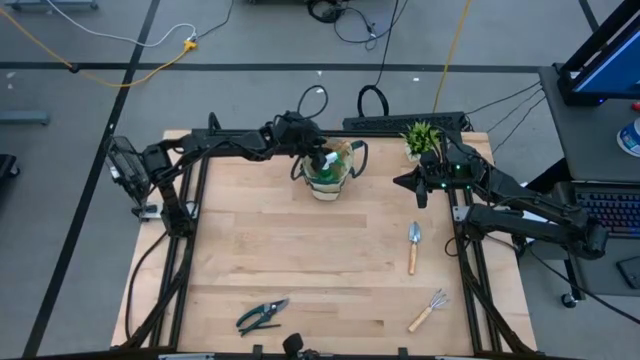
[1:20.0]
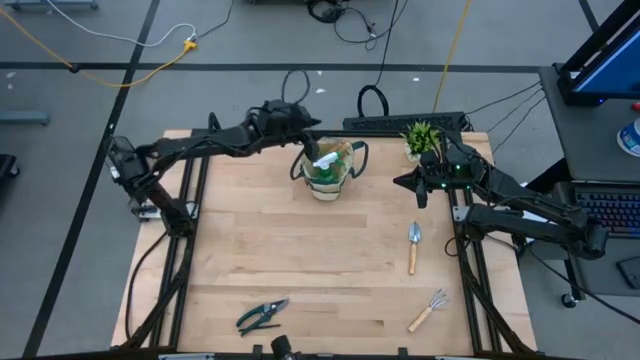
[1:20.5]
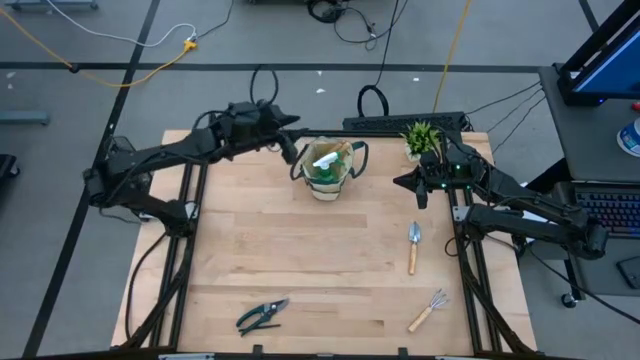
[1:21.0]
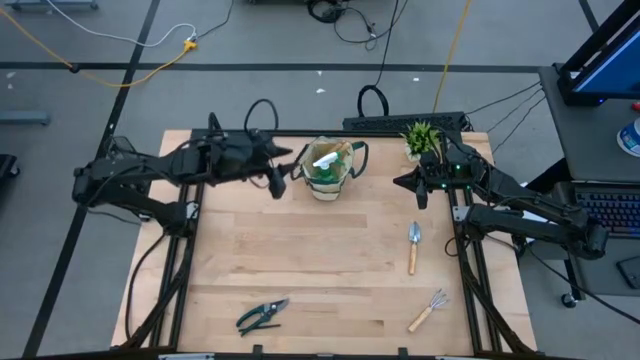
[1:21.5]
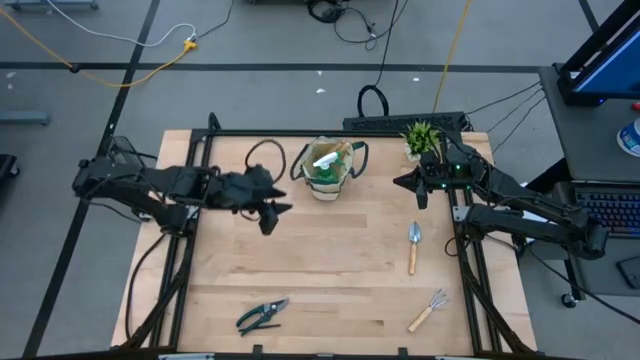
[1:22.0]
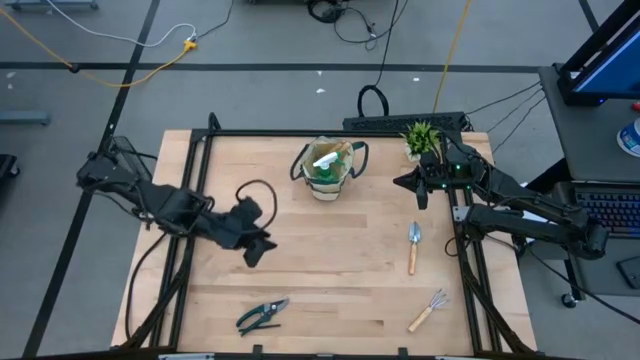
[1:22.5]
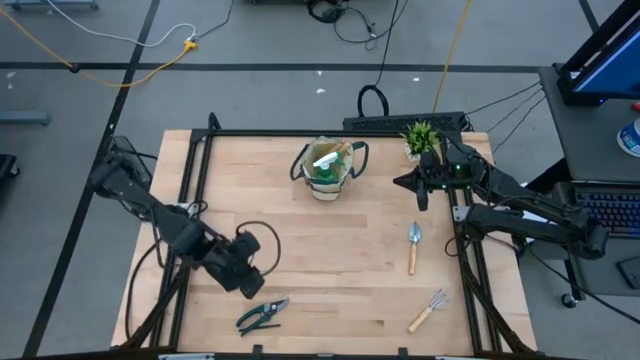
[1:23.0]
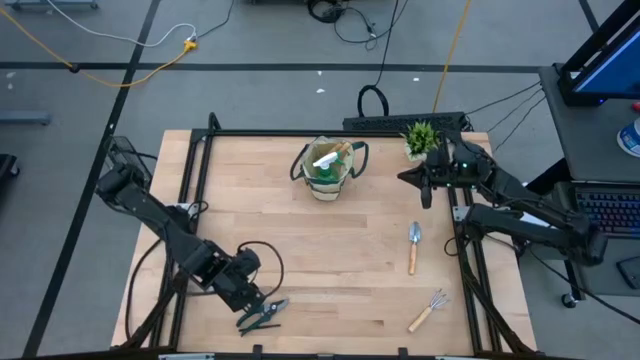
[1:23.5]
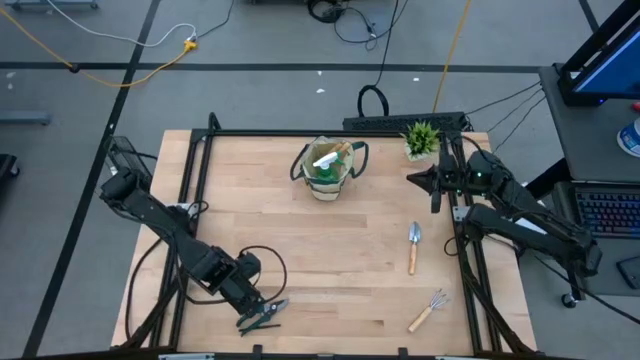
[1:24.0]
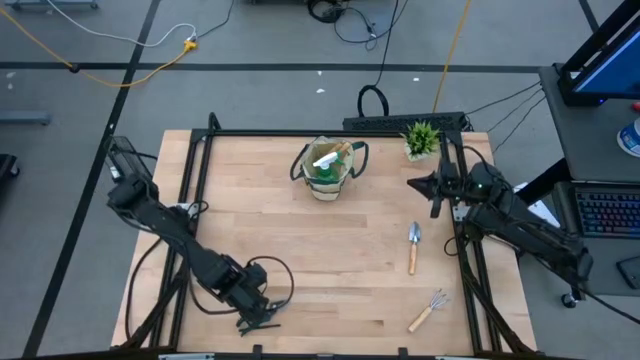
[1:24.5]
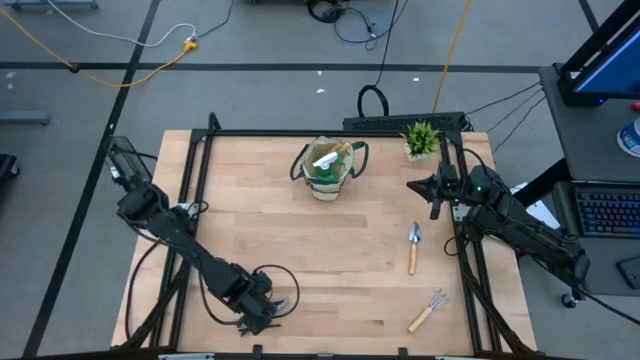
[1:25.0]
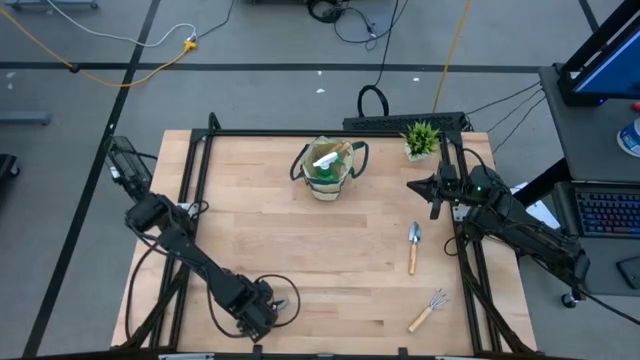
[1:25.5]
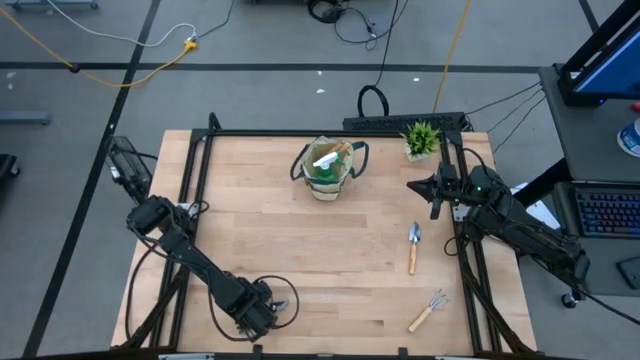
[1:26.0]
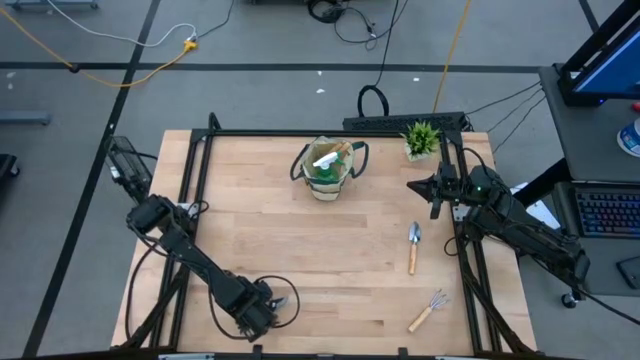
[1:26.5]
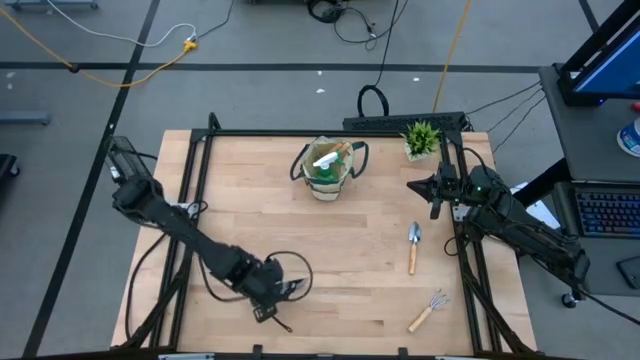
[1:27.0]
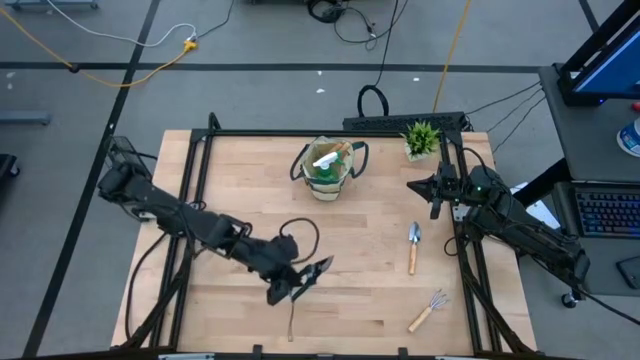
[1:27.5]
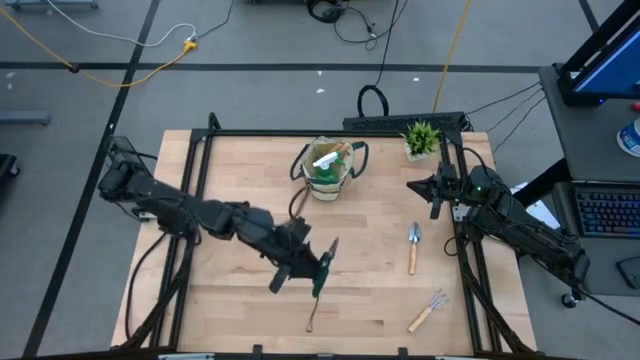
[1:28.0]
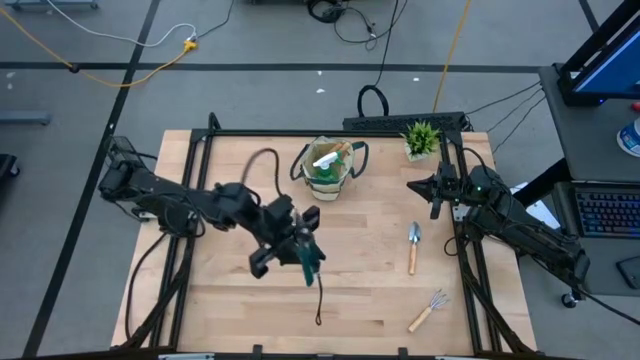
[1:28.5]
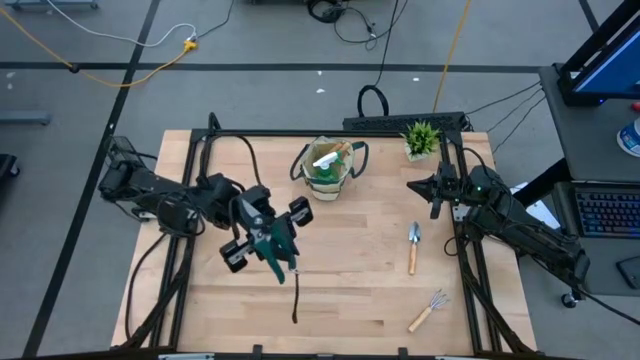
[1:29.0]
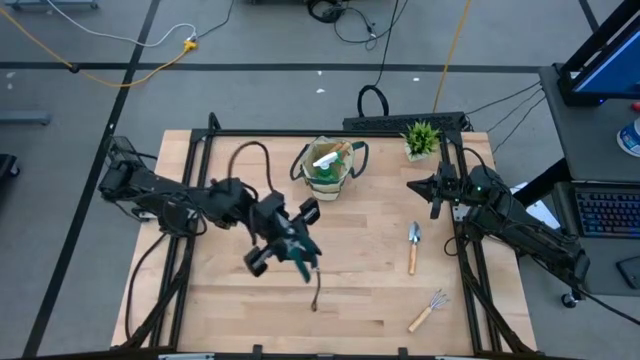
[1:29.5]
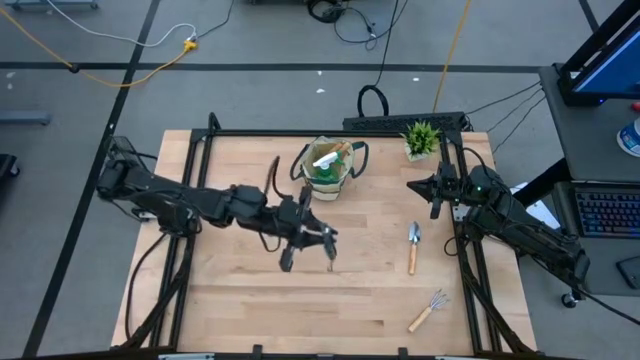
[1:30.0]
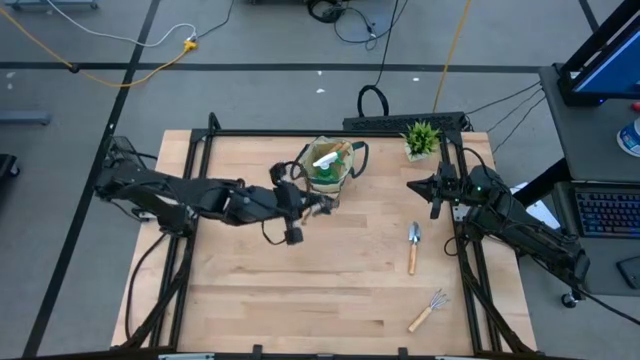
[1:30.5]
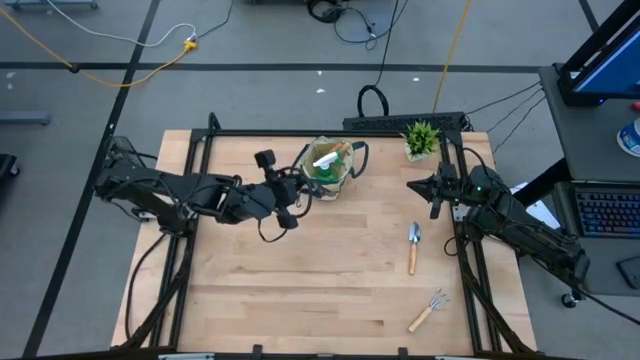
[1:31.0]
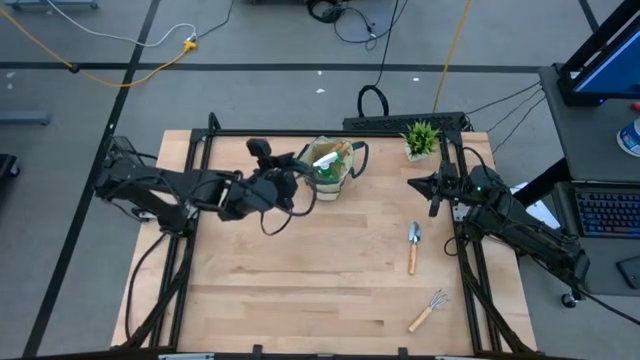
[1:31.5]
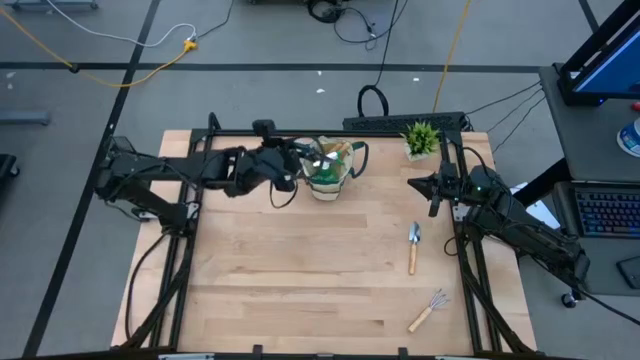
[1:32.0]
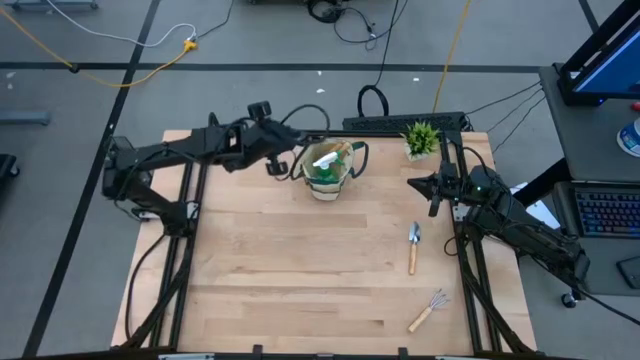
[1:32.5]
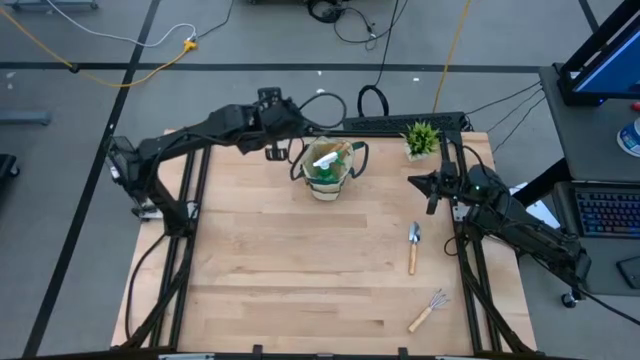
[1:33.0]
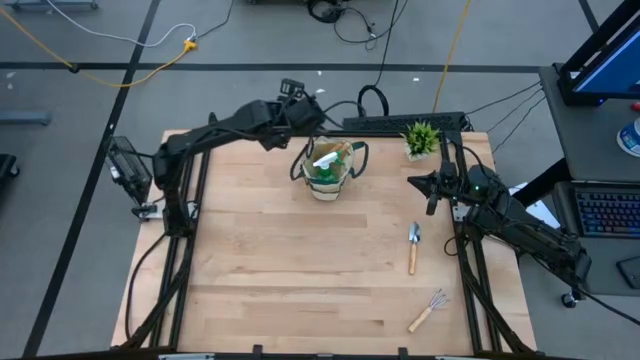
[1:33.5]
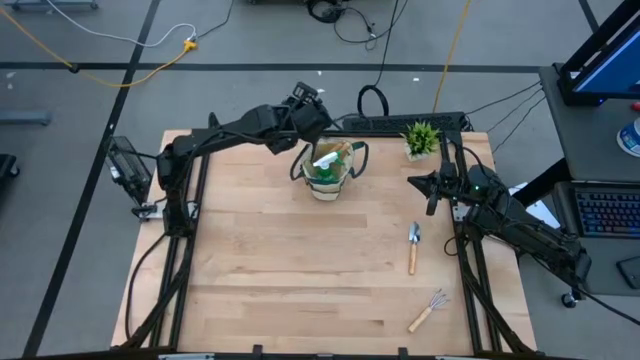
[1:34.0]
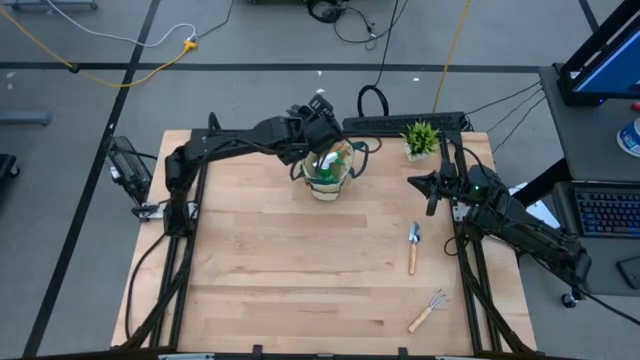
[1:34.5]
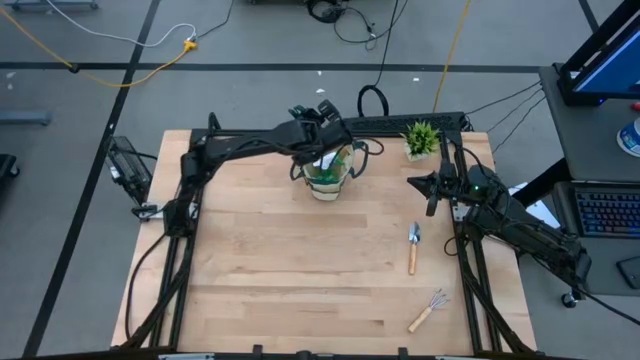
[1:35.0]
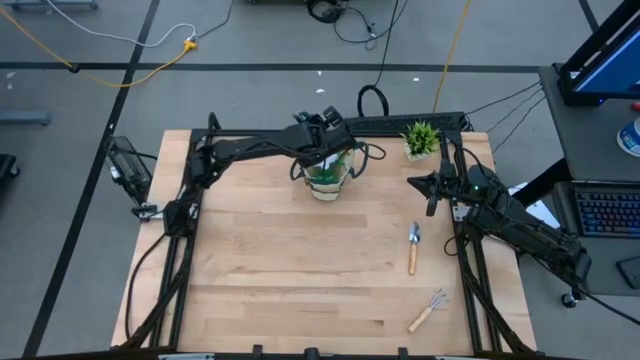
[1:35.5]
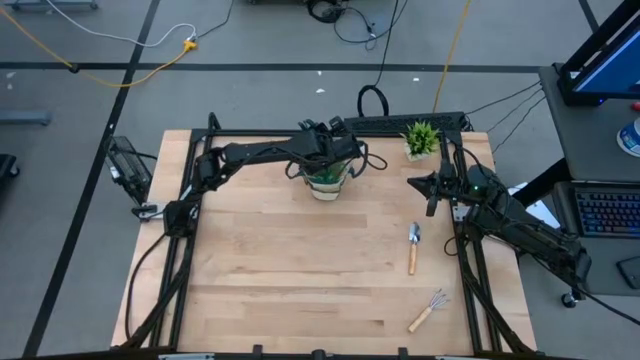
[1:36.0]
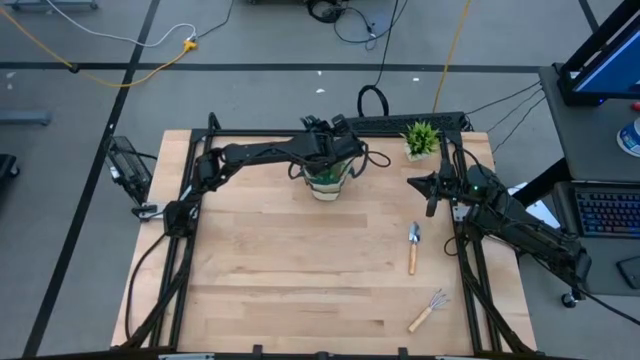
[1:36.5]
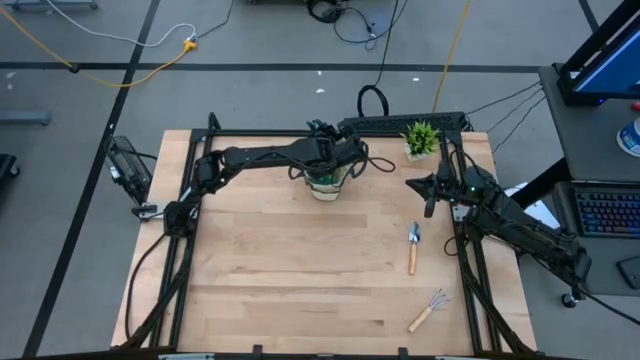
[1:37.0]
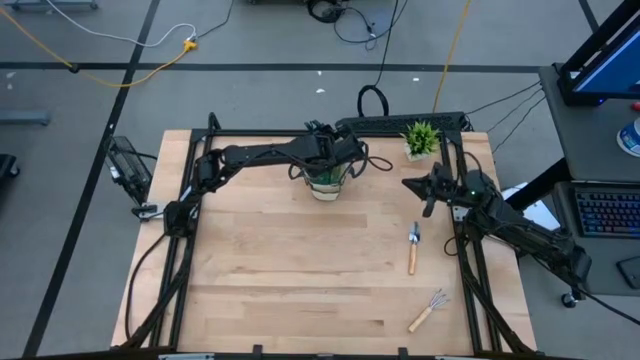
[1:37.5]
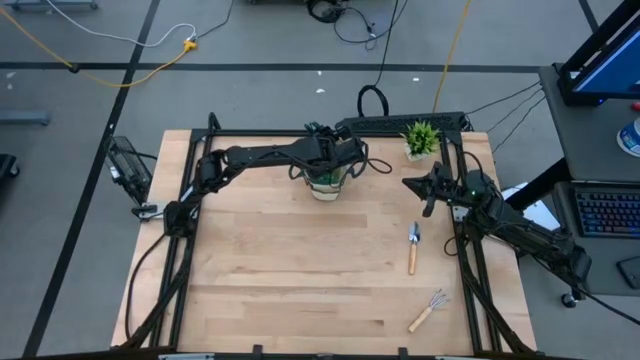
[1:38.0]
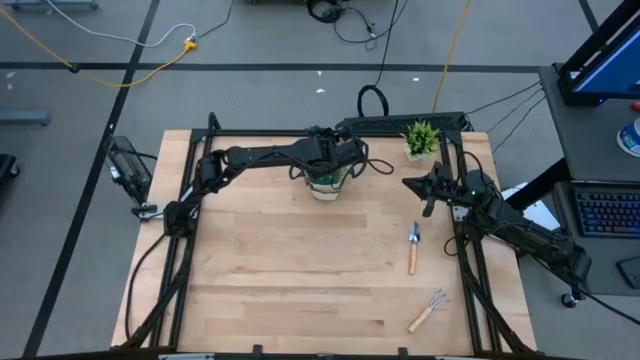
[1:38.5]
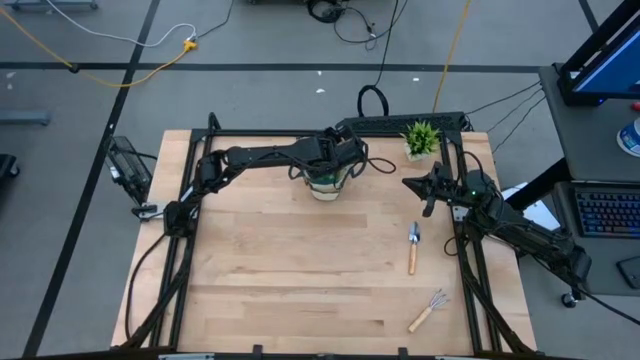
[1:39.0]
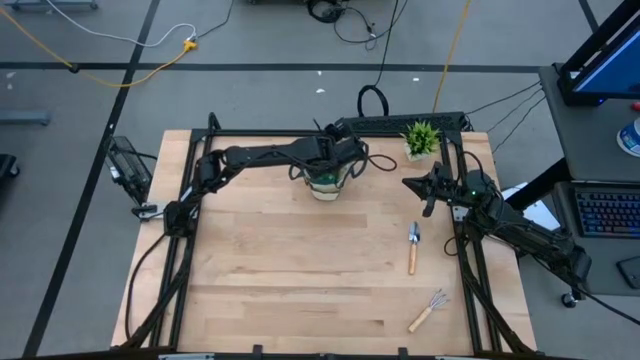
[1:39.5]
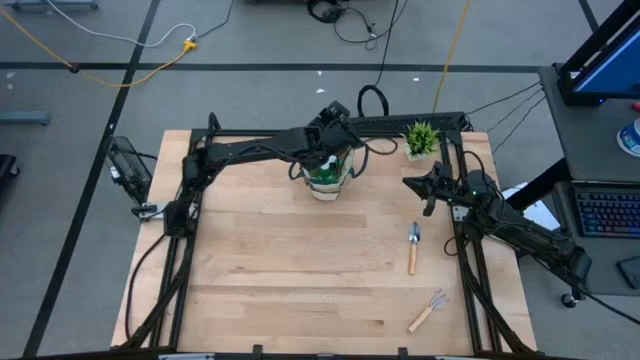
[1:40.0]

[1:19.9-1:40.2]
Task: Pick & Place Garden tools in Gardening bag
Put the green shear scissors into the gardening bag
